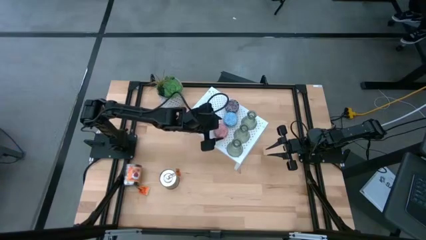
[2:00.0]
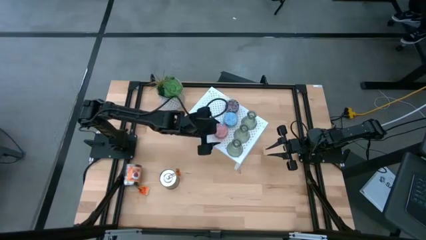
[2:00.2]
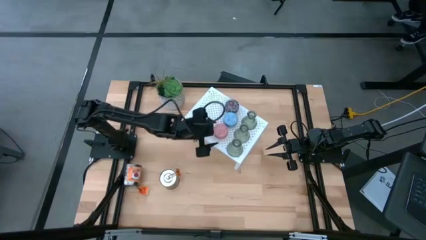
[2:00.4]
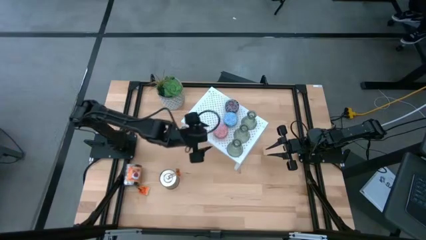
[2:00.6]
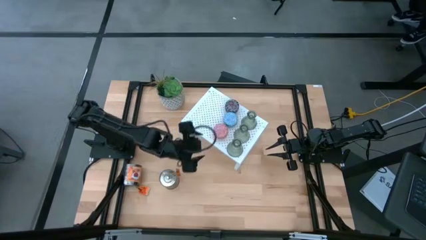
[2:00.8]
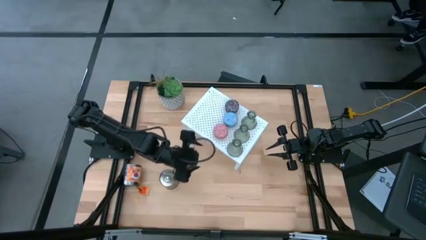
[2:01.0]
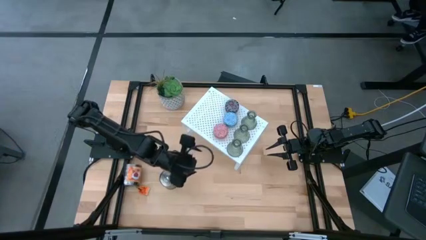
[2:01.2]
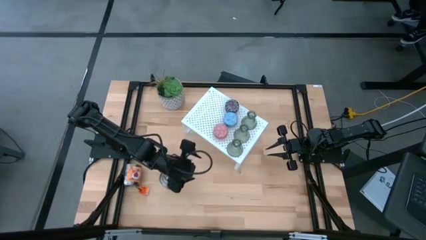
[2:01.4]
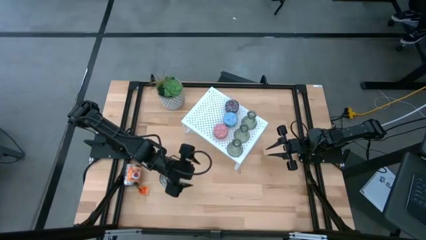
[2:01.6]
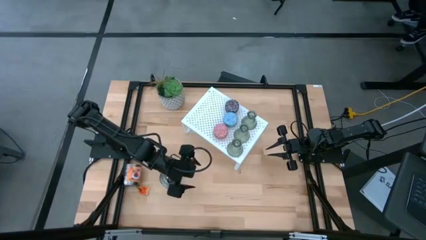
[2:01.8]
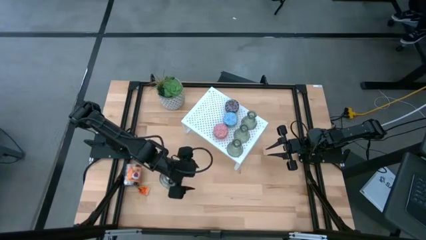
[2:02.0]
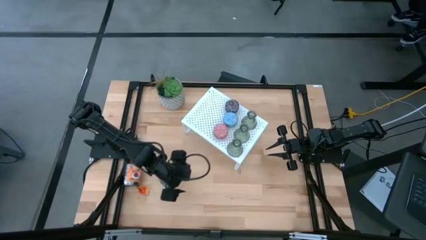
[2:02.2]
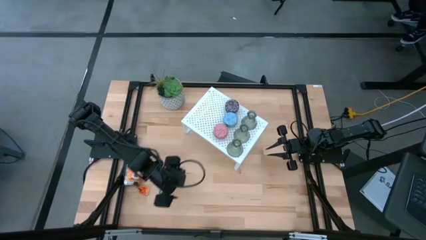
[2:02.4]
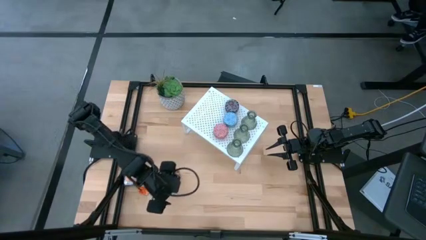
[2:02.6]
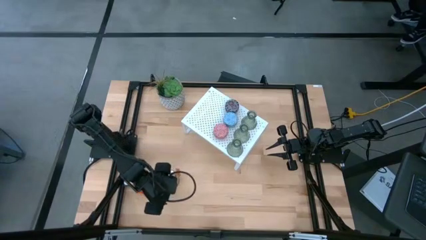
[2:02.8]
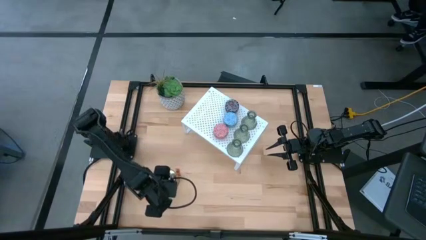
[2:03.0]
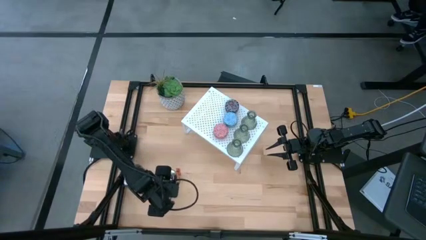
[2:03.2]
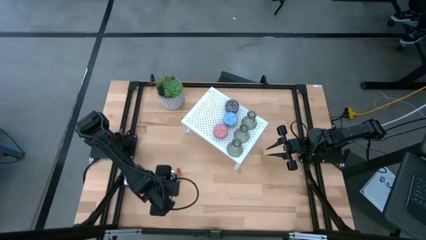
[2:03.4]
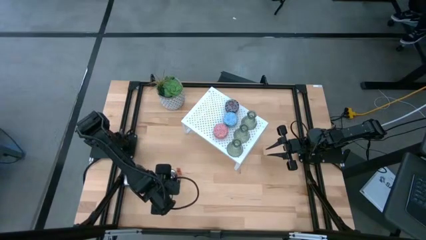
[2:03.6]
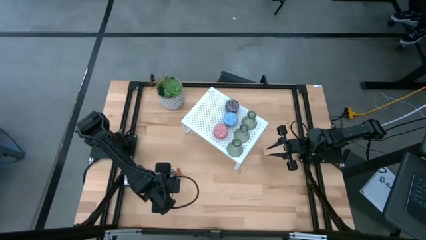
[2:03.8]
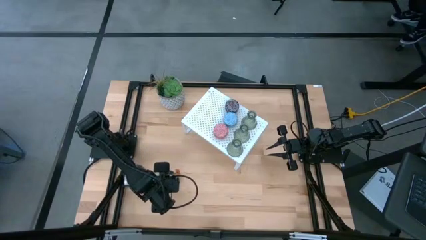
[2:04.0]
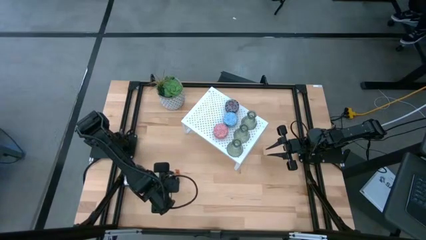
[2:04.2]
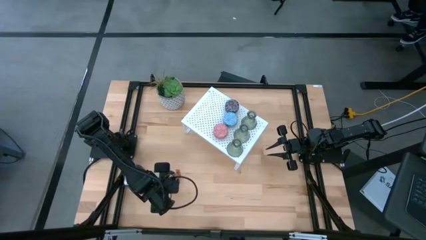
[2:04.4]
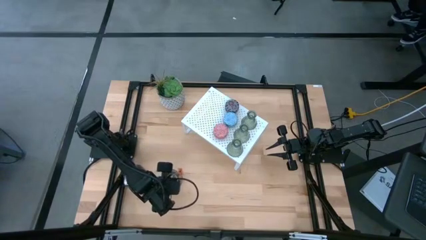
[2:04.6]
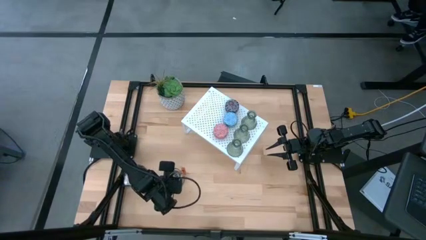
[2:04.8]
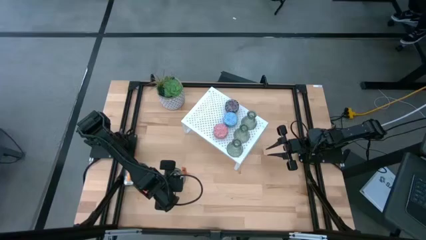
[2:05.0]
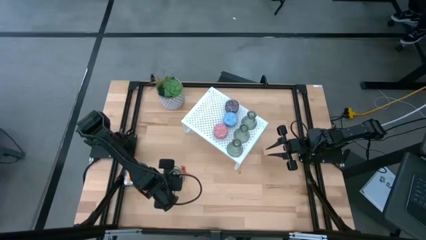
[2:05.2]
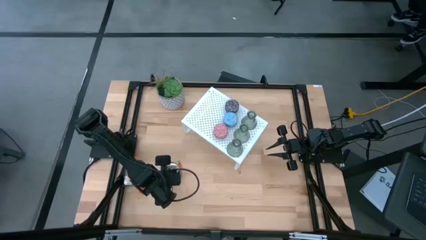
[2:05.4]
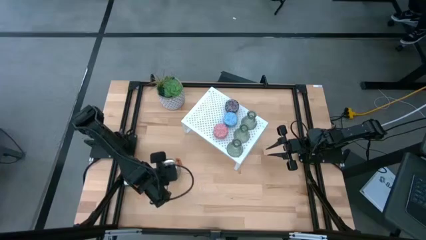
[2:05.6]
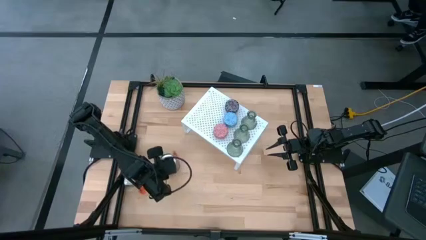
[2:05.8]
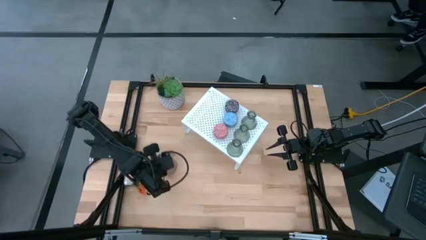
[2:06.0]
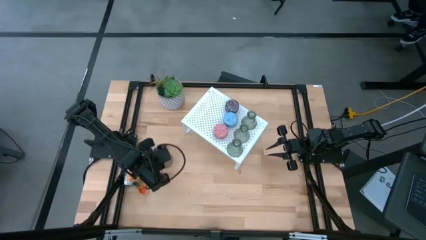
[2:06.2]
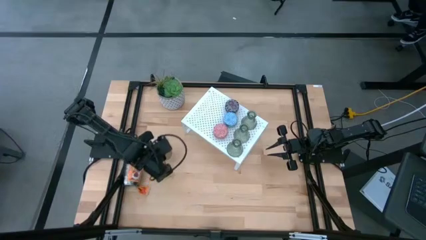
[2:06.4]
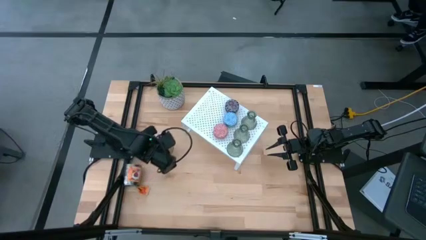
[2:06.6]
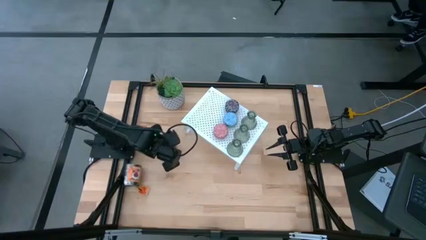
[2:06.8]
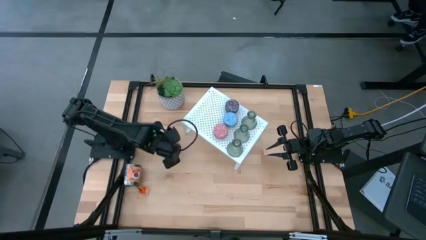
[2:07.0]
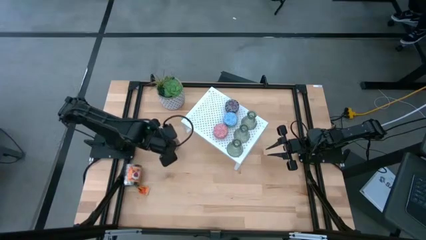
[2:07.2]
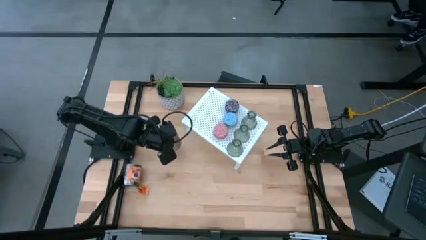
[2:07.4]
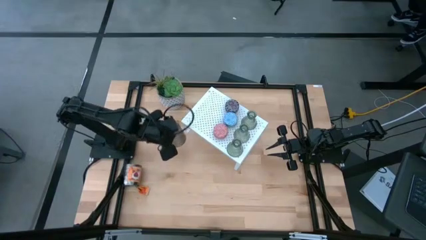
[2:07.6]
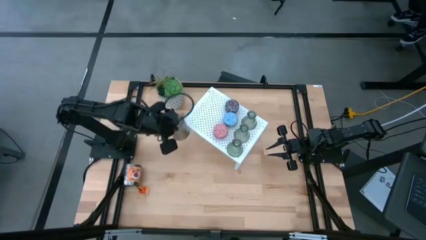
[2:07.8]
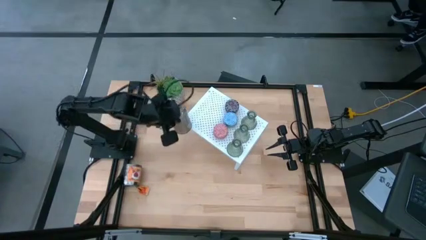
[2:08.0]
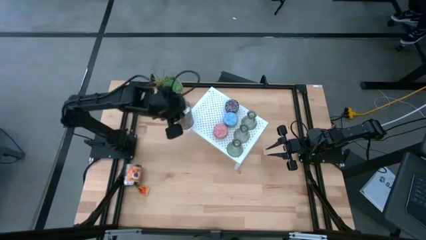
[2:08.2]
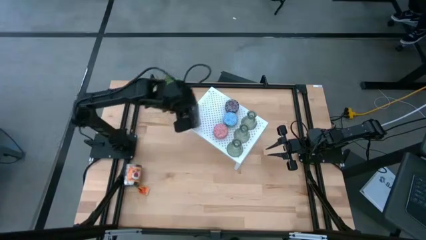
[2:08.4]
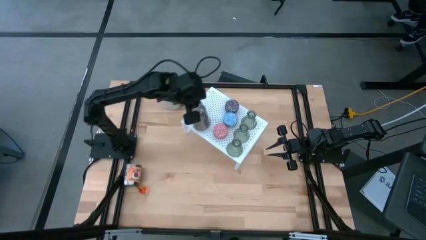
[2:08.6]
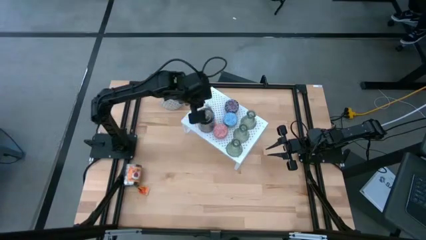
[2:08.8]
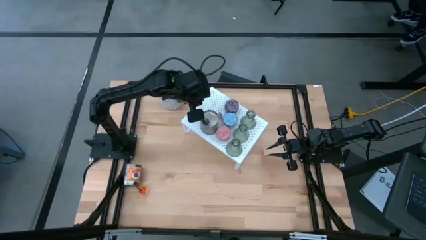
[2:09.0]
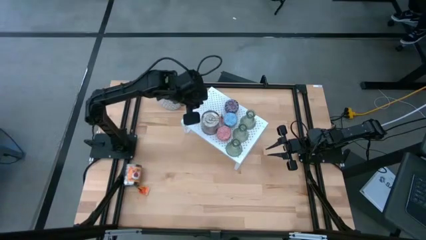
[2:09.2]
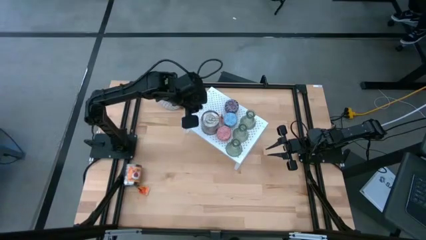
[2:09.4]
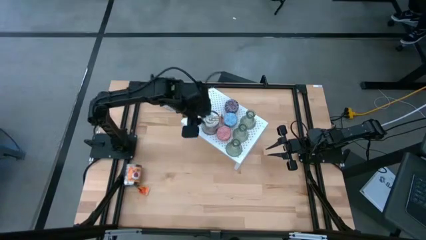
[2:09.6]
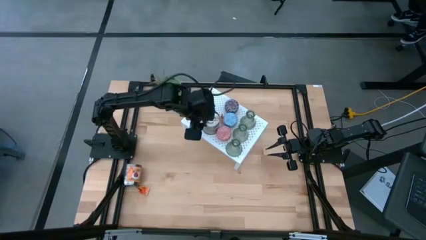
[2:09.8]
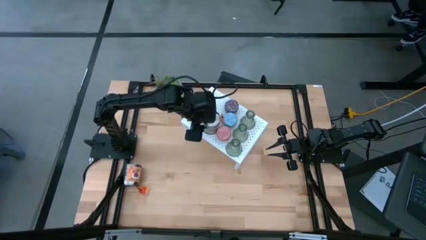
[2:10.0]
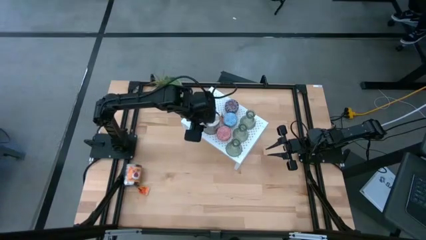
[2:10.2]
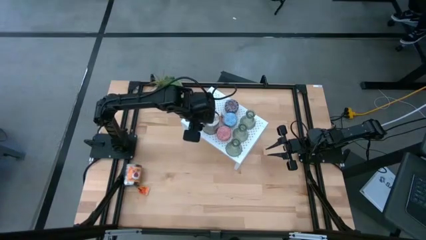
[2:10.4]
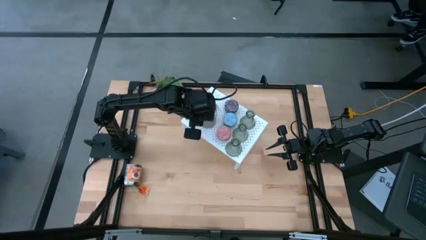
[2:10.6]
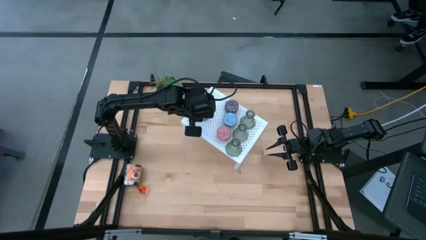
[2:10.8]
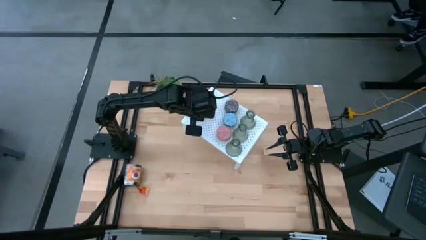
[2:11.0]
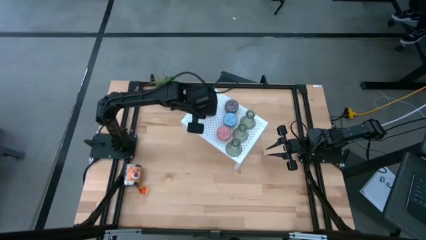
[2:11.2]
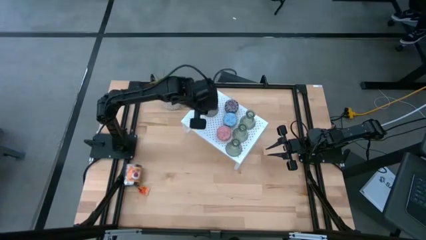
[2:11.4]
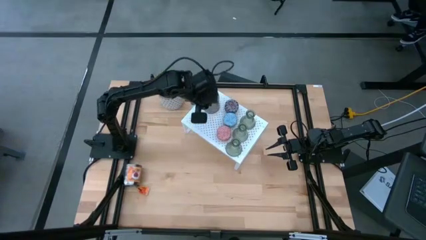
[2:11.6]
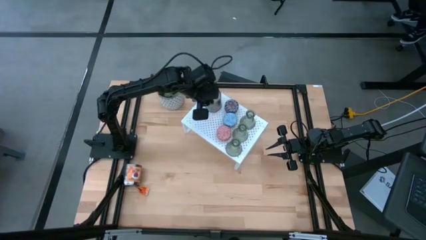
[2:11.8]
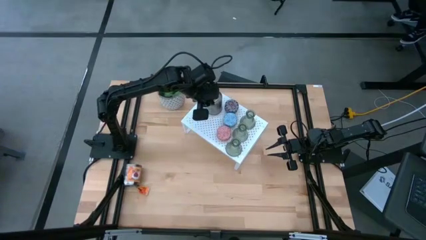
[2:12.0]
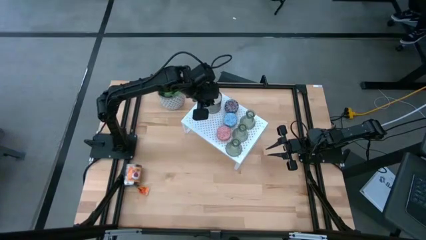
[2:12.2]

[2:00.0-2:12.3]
Task: Pick & Place candle stick holders
Put the right silver scented candle on the shelf

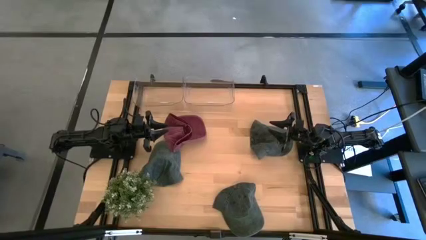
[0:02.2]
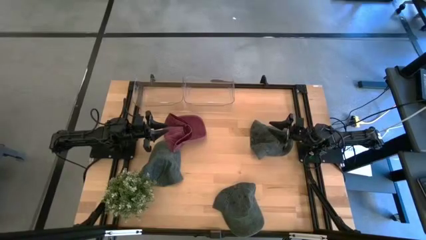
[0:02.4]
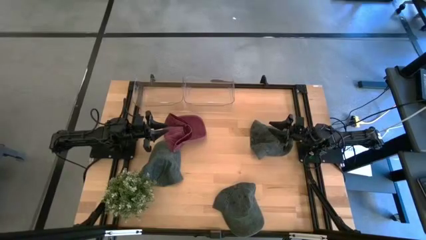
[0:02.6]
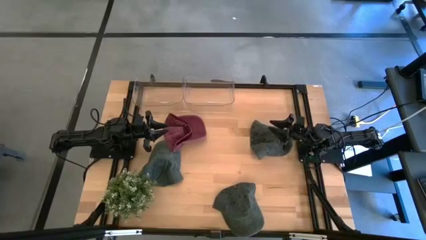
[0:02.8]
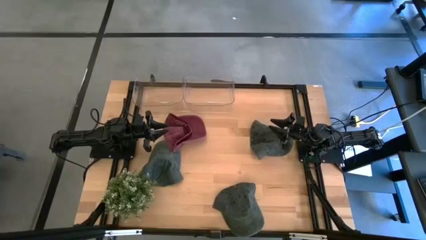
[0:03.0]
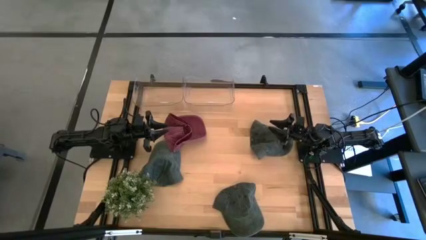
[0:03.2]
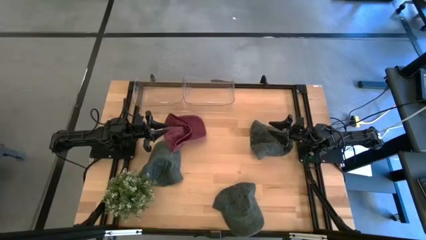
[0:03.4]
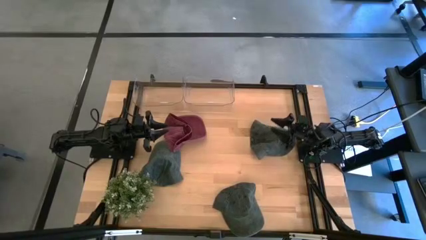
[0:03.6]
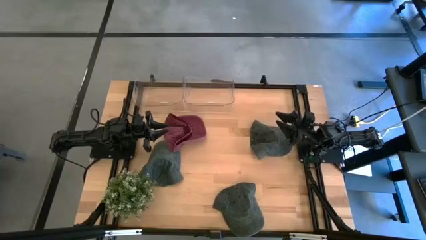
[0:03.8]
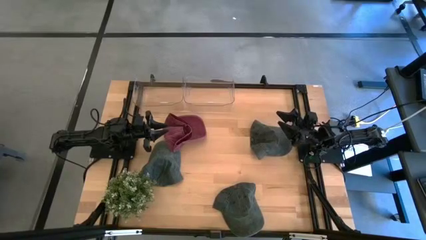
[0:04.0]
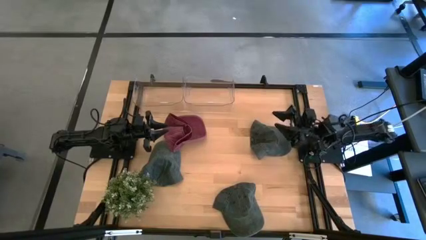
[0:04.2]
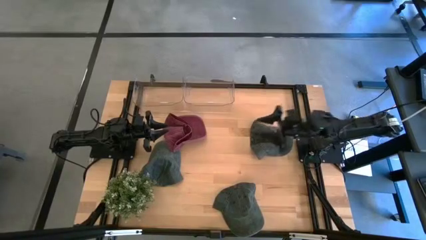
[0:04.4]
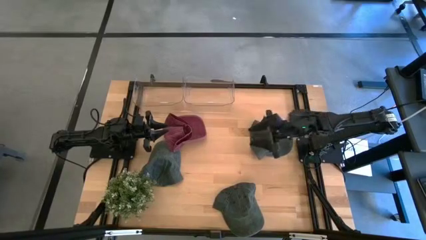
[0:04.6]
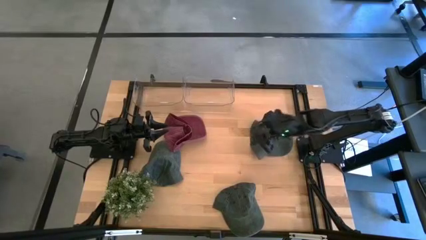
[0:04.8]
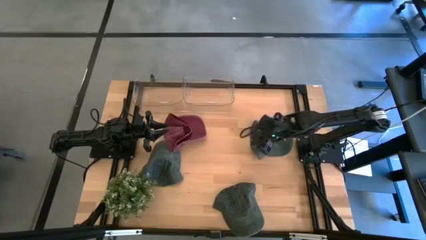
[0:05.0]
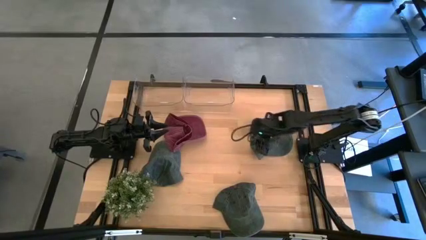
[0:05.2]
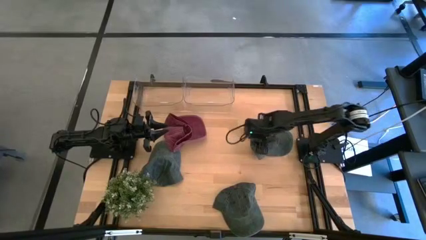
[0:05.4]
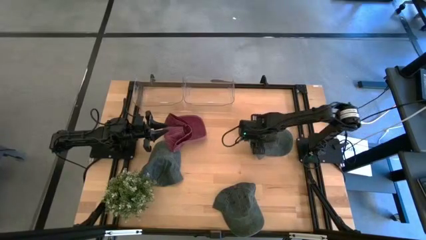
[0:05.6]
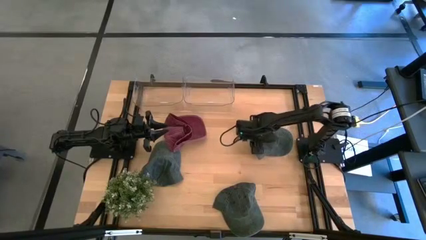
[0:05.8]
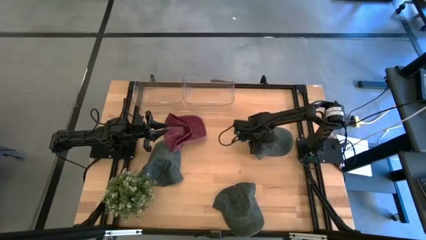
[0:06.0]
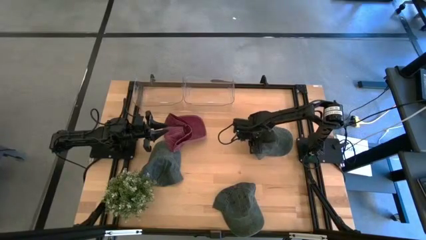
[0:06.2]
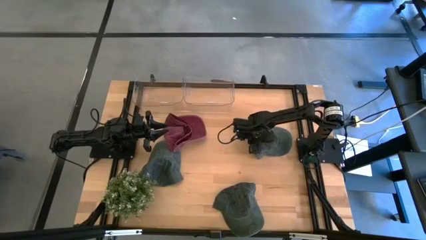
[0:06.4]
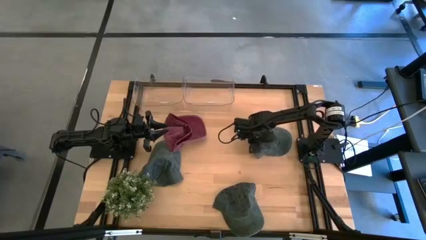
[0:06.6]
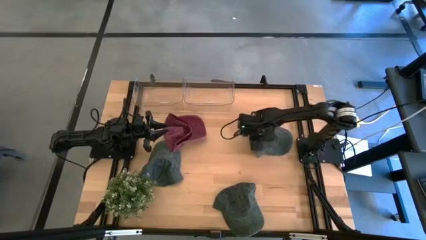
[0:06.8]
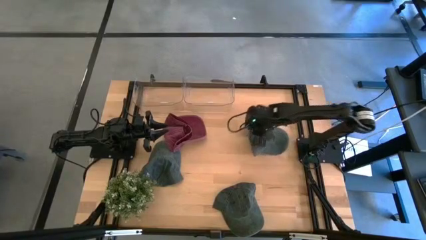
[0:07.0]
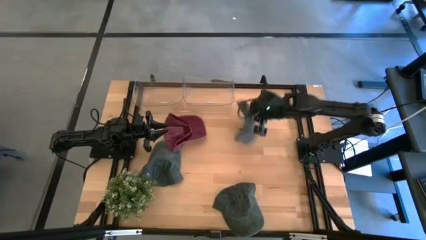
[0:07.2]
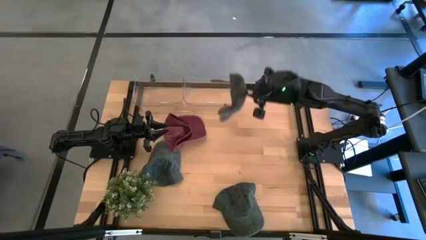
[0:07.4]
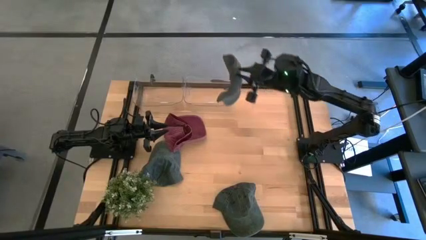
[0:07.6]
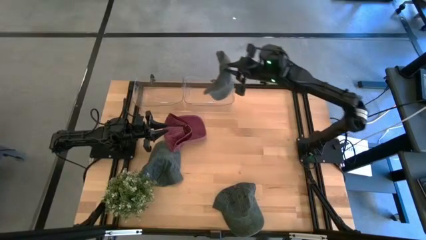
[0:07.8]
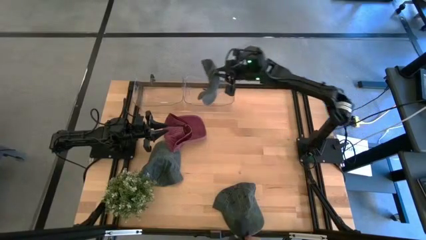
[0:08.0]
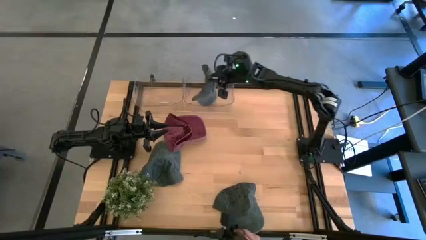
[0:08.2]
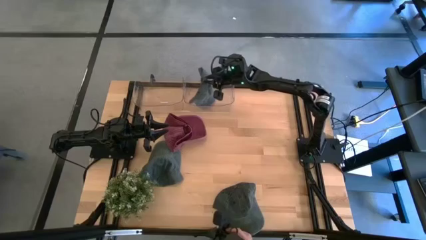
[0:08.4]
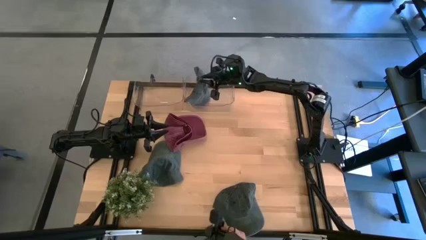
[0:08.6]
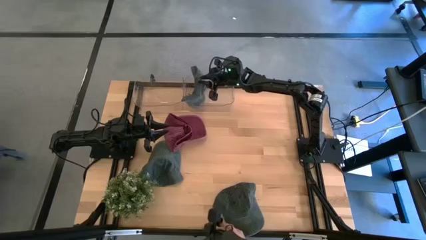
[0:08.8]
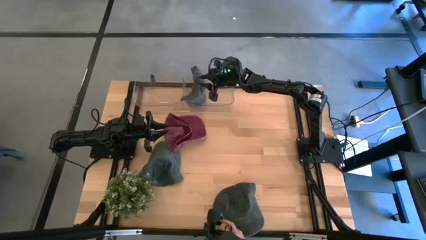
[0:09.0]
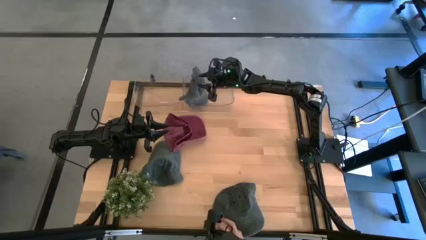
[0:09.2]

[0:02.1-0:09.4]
Task: Pick and place caps into container
Put the top right blue cap into the right transparent container
